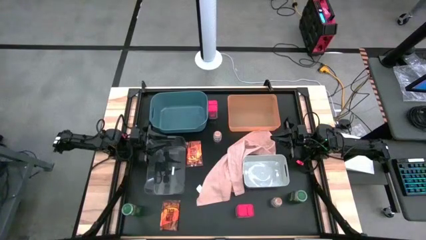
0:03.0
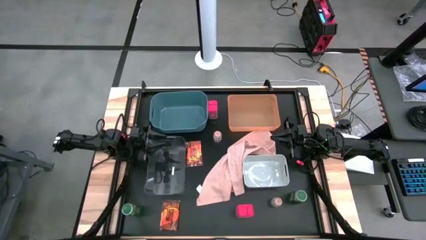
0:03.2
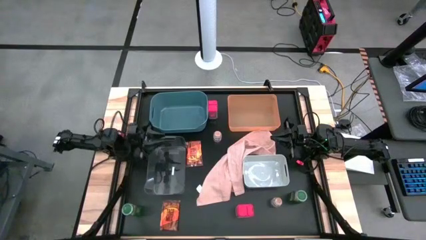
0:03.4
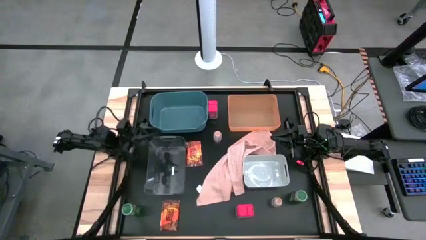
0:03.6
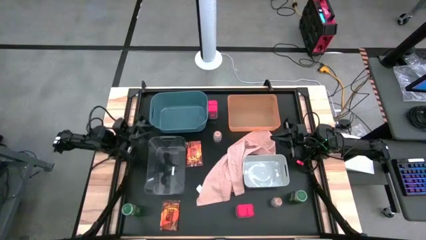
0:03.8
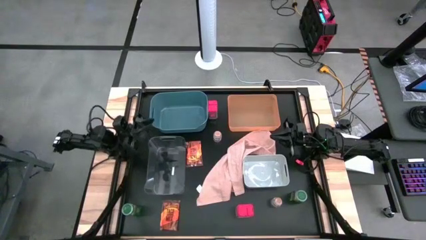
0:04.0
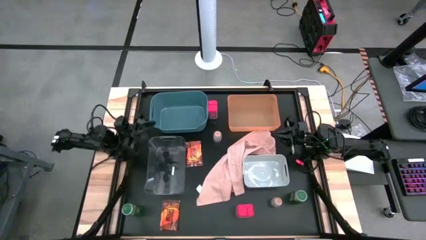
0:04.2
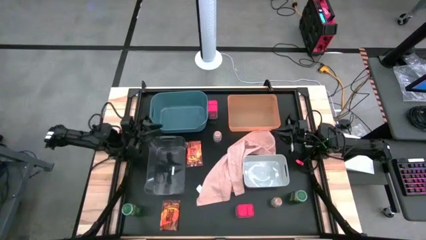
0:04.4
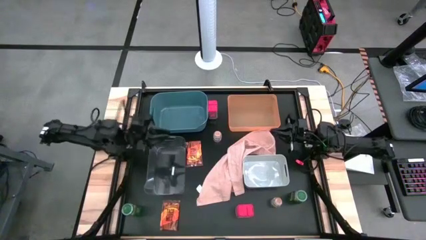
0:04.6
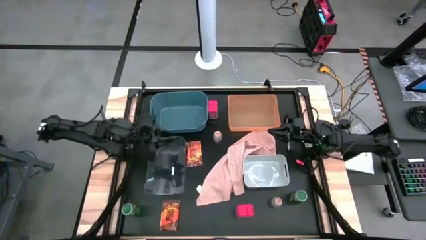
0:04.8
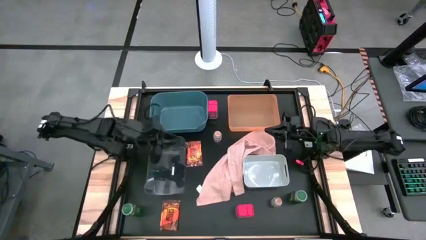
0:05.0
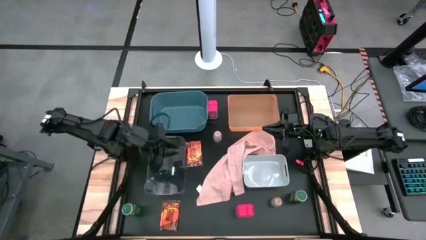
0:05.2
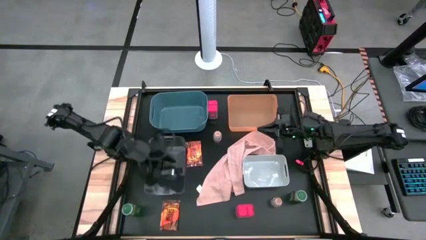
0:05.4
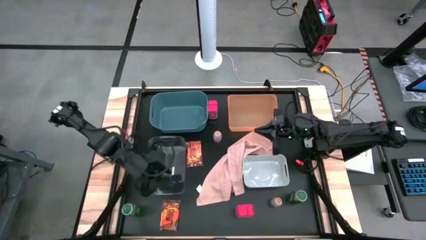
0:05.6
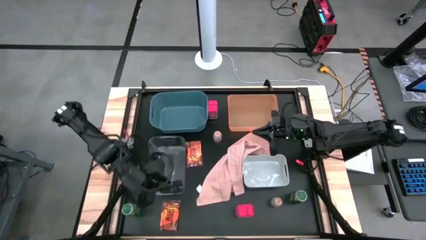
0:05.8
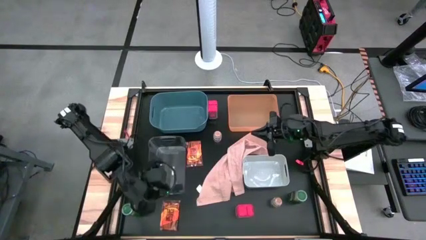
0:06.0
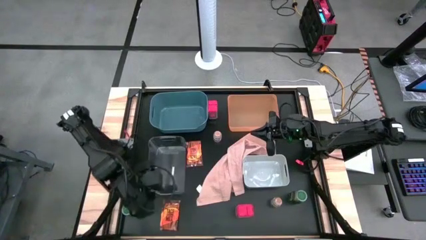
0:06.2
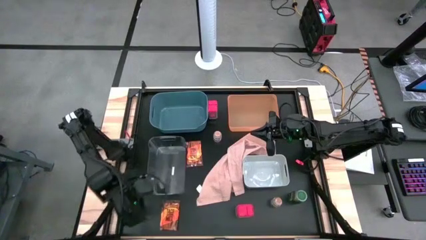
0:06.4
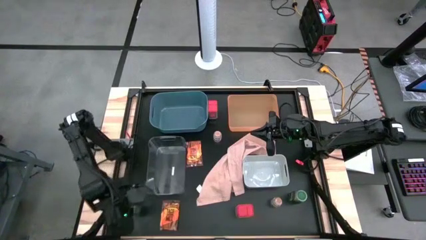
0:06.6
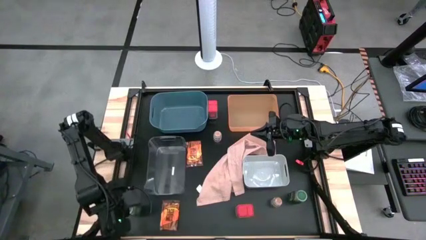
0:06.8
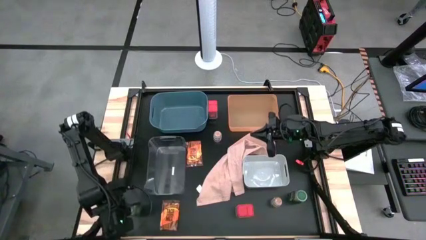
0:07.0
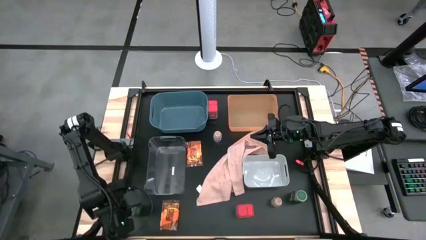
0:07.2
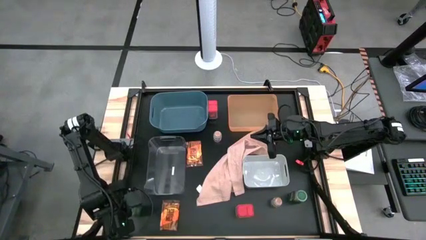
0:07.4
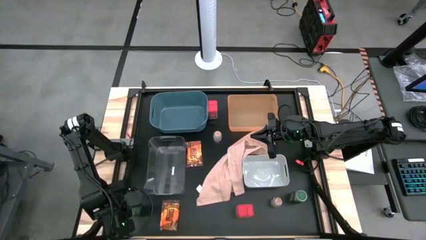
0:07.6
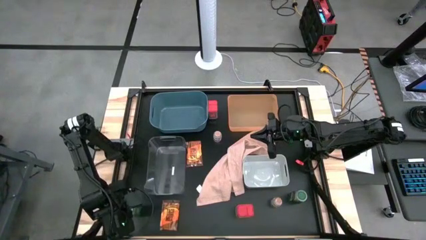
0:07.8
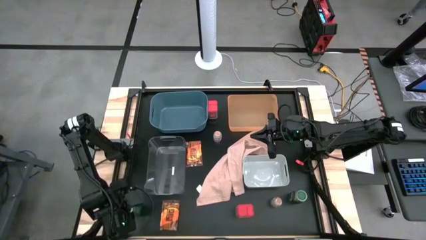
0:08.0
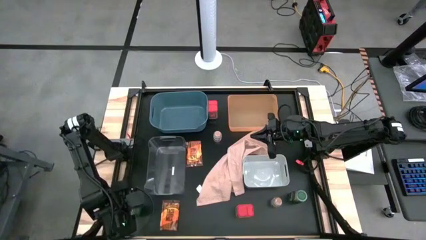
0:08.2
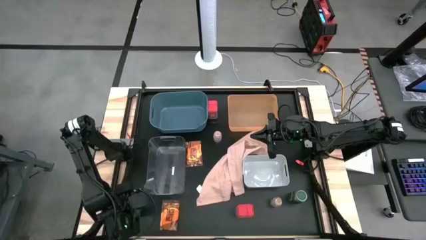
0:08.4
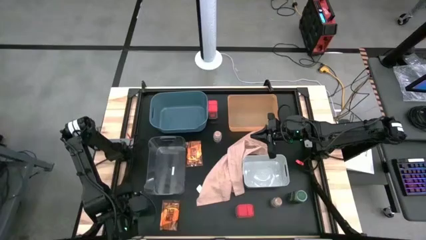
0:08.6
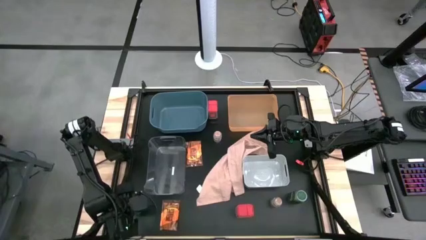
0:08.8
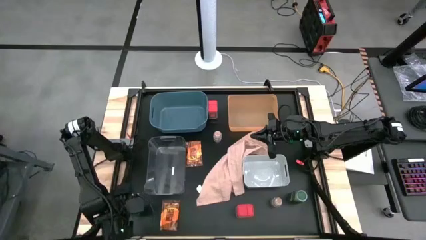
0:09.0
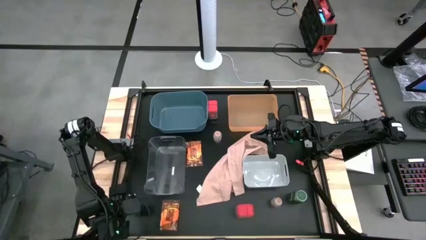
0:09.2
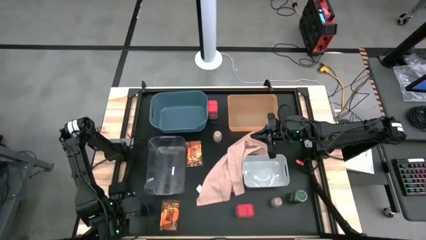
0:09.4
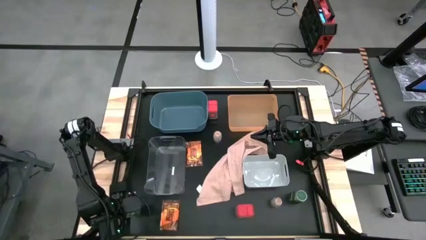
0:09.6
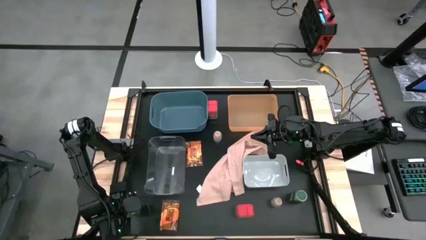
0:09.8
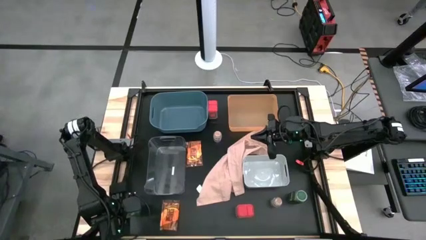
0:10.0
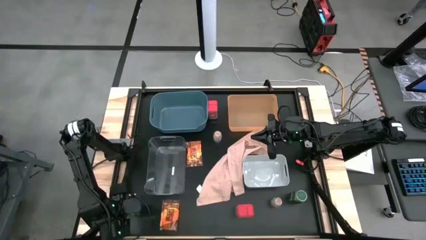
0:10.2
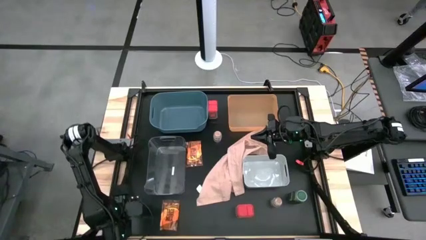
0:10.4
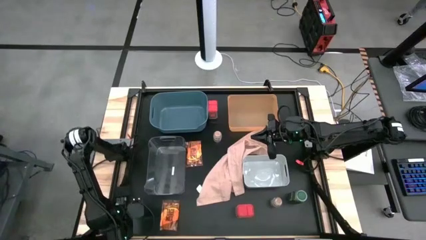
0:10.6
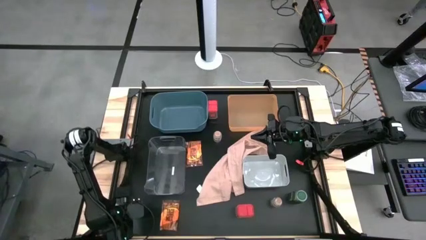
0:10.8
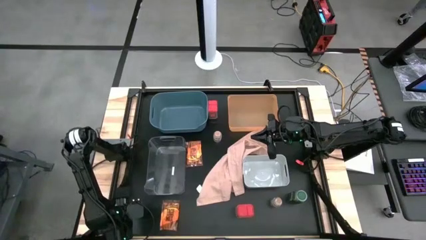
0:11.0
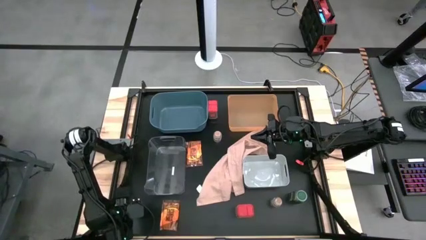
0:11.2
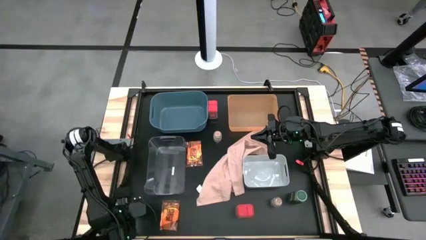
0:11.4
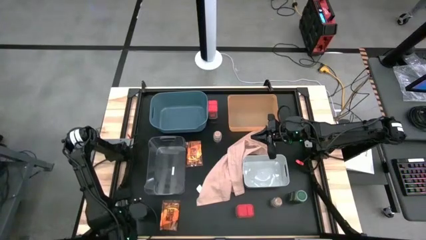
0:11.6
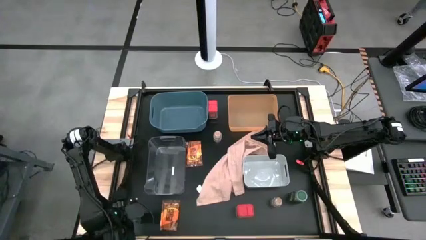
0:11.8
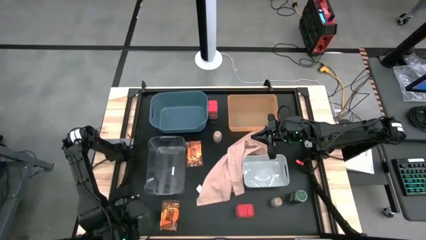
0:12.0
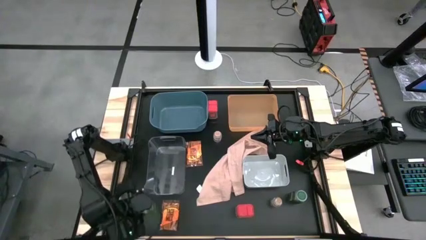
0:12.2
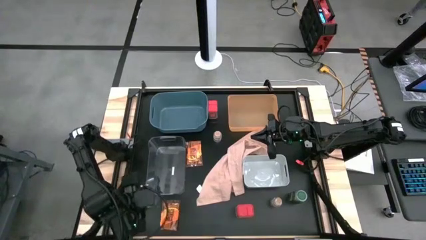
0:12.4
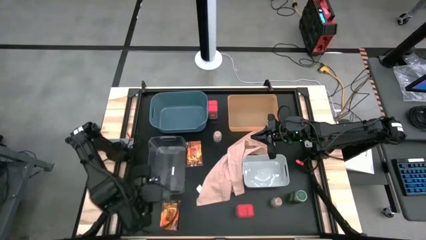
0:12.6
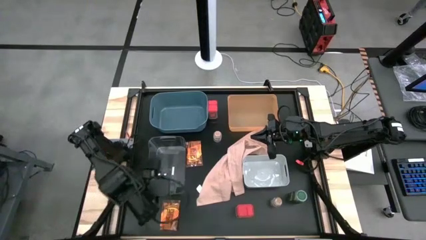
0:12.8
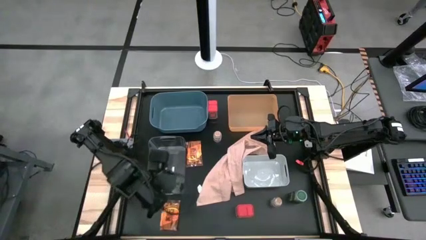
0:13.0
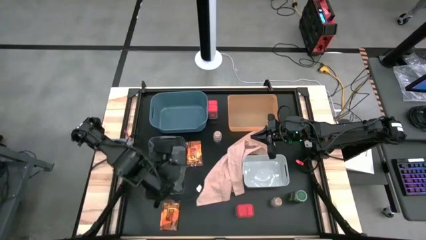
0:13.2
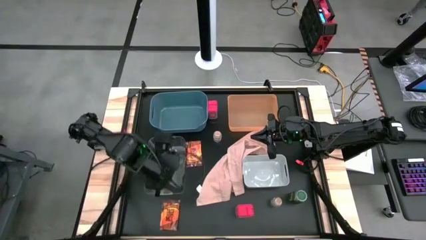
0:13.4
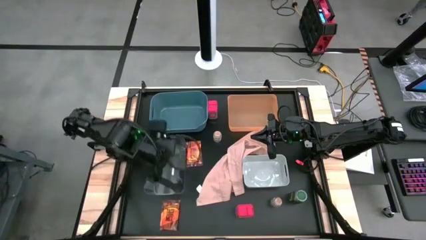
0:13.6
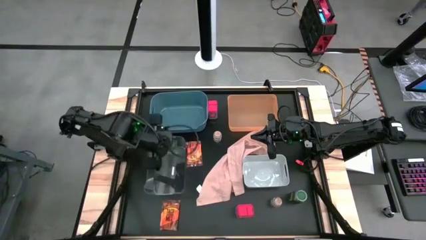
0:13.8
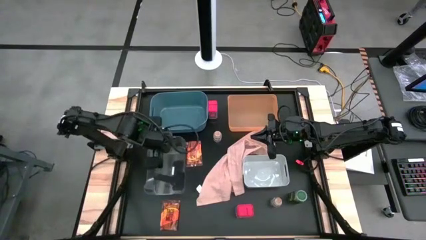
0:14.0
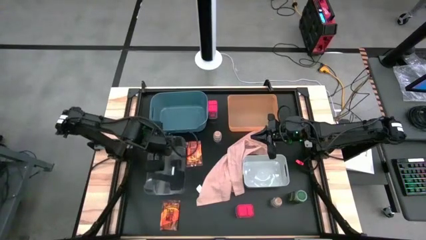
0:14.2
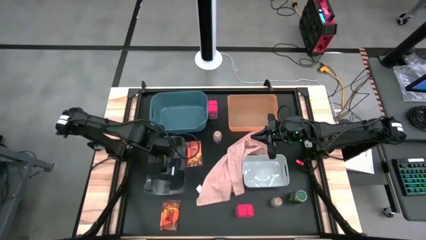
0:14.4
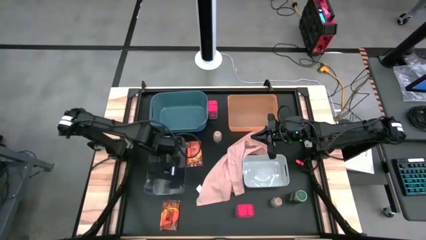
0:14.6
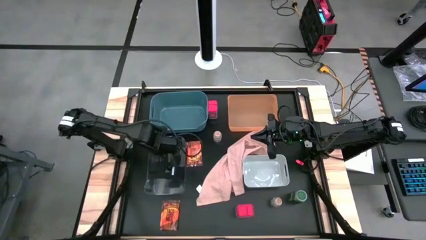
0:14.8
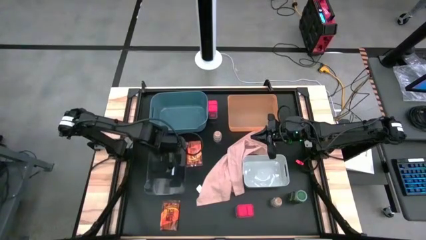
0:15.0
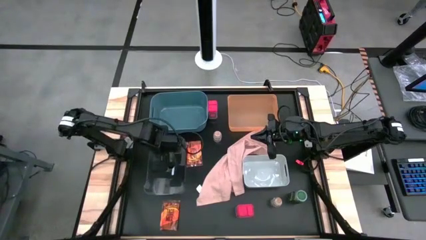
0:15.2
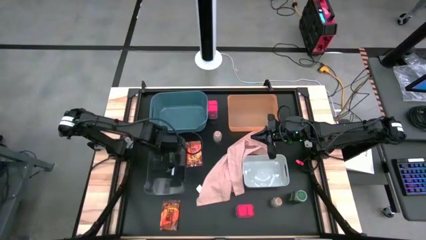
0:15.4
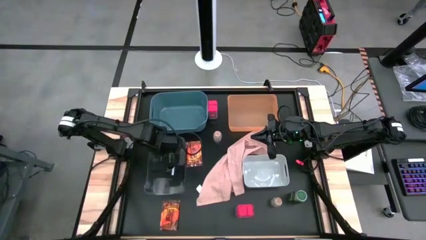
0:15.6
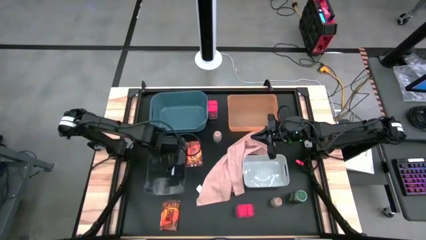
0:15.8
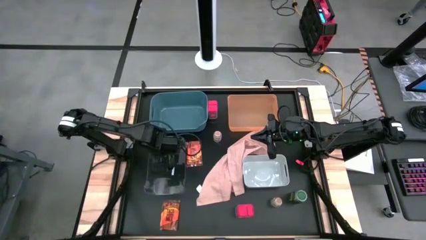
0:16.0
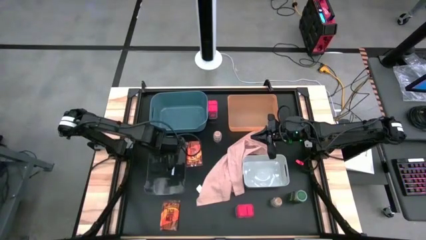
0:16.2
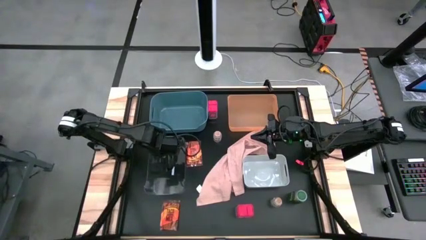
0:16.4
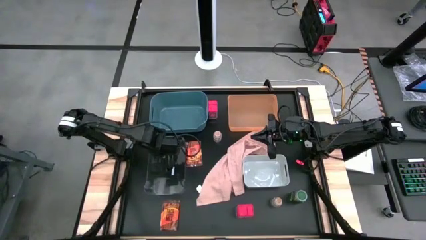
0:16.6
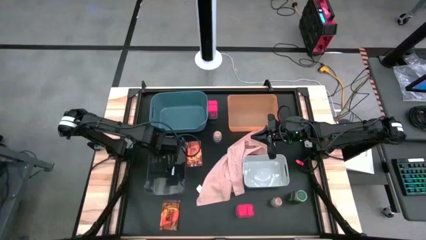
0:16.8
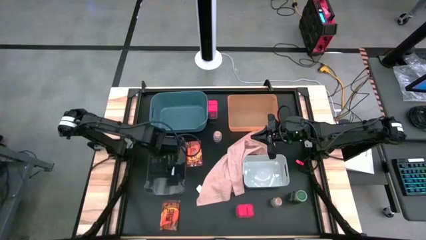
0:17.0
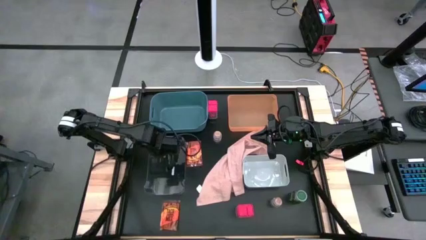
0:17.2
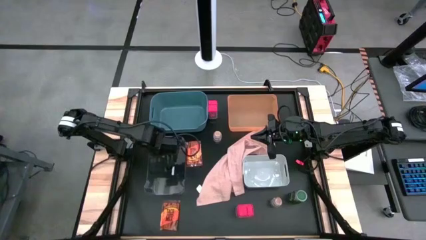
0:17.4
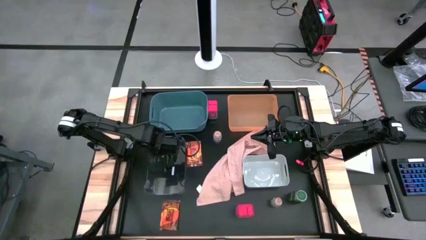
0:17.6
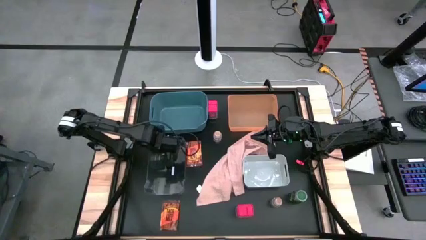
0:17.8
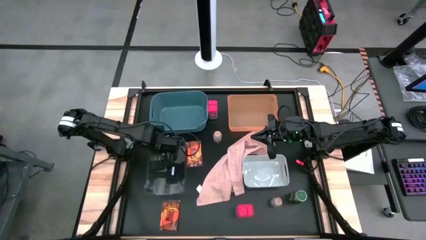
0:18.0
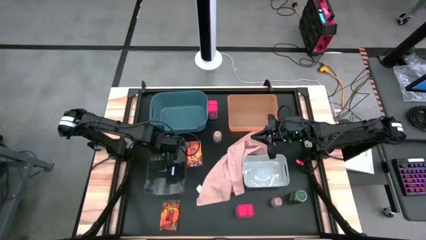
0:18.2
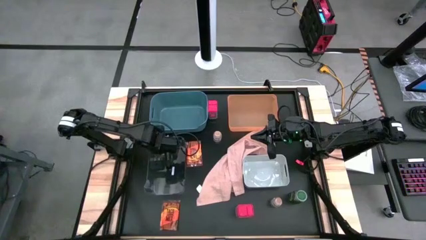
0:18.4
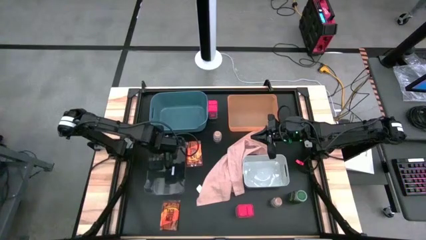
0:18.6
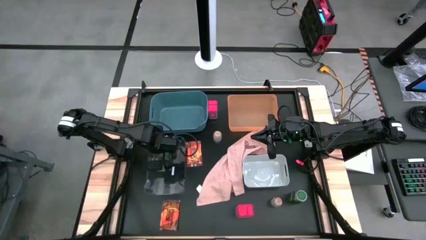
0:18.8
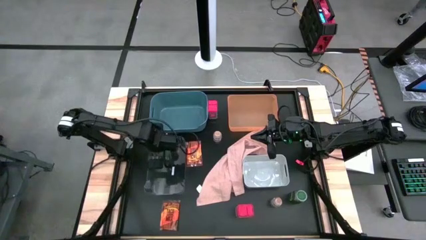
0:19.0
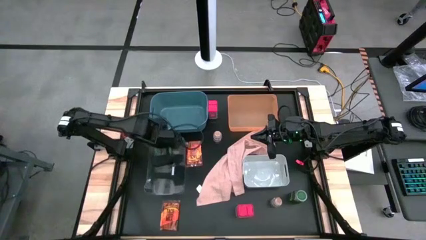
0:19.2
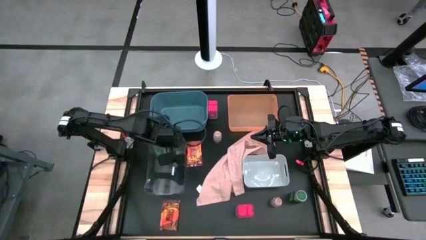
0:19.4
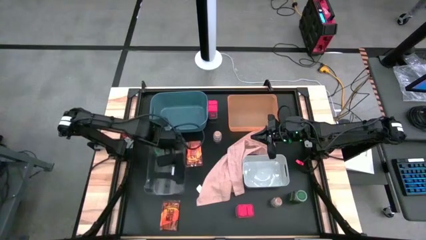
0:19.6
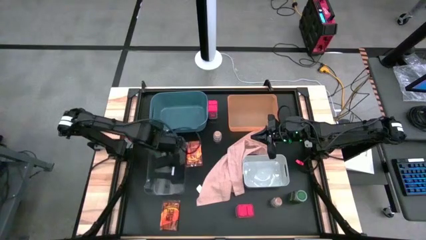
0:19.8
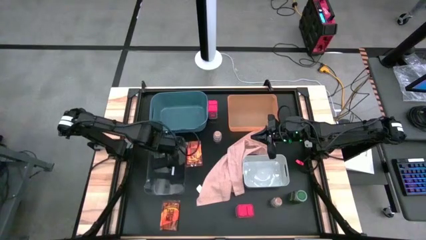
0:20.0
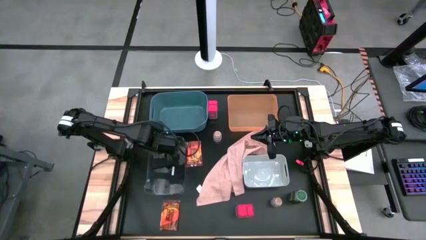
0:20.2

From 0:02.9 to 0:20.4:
Task: Sort spices by type
Put the left green seasoning bottle into the transparent bin
